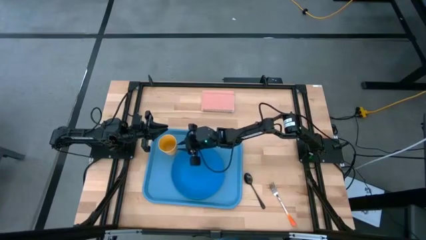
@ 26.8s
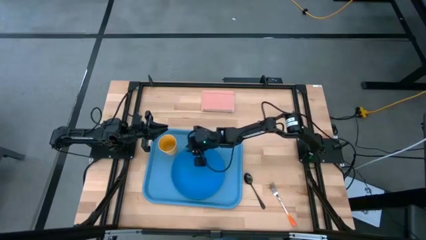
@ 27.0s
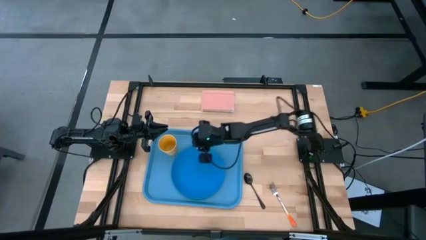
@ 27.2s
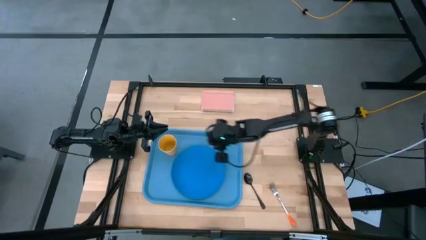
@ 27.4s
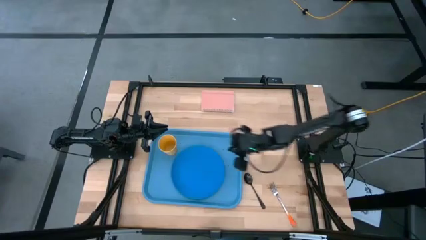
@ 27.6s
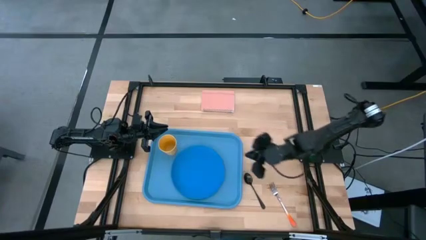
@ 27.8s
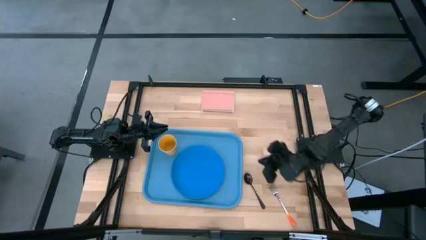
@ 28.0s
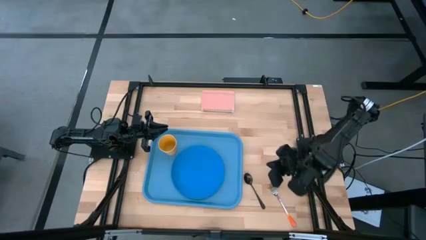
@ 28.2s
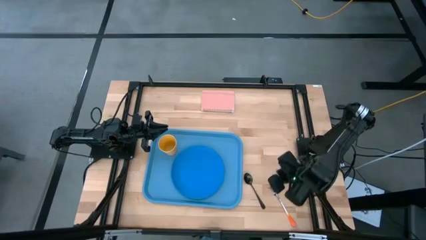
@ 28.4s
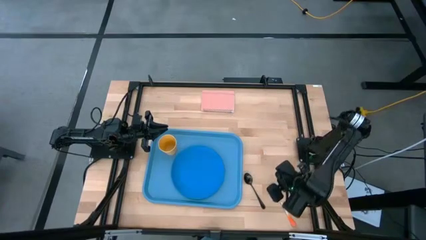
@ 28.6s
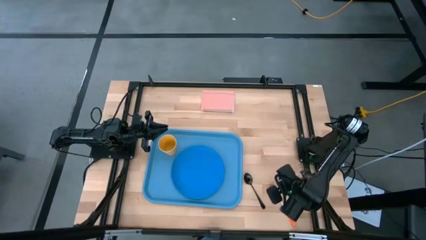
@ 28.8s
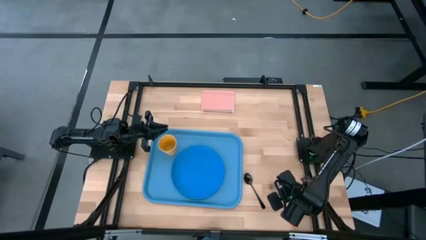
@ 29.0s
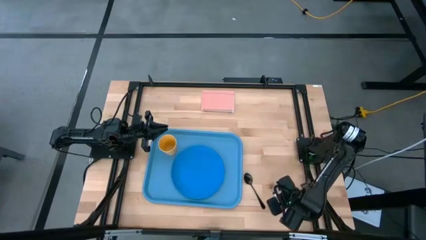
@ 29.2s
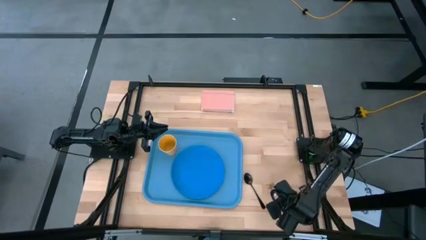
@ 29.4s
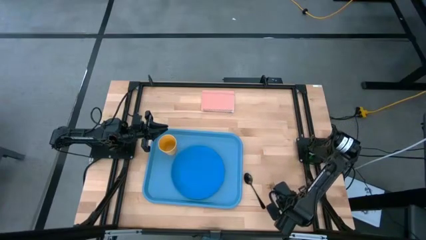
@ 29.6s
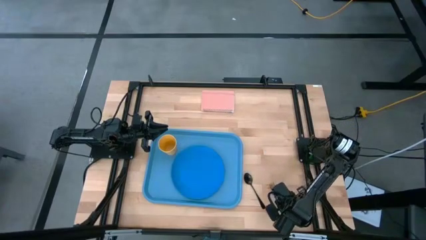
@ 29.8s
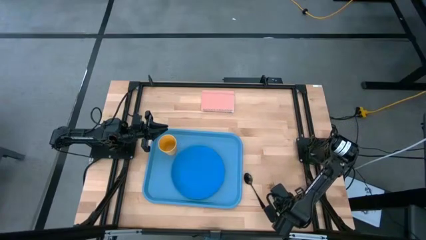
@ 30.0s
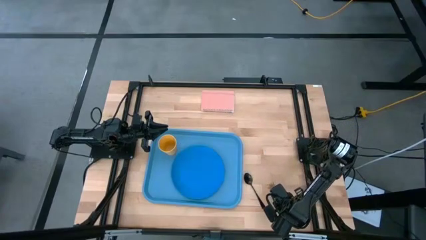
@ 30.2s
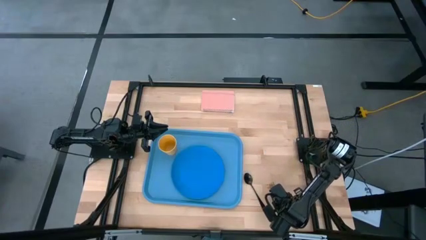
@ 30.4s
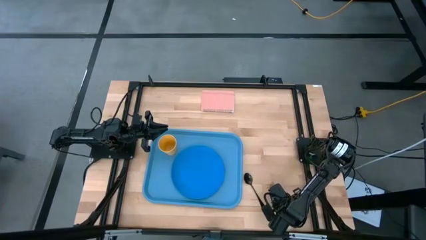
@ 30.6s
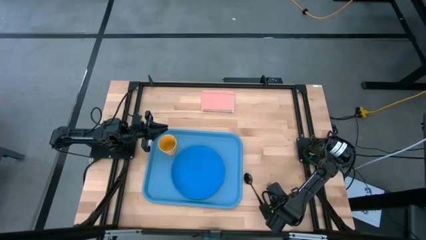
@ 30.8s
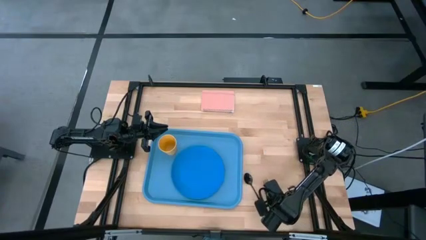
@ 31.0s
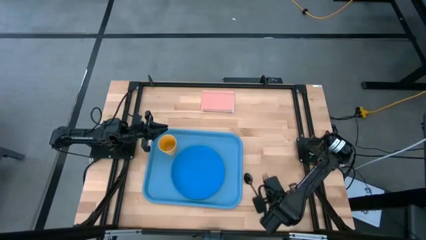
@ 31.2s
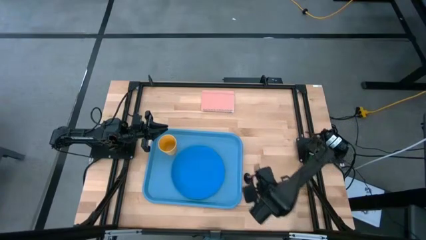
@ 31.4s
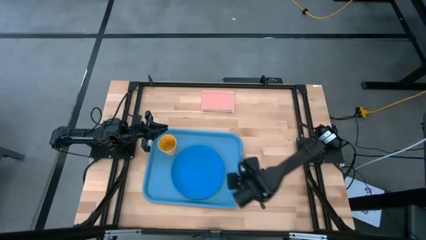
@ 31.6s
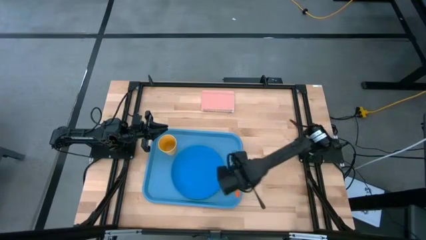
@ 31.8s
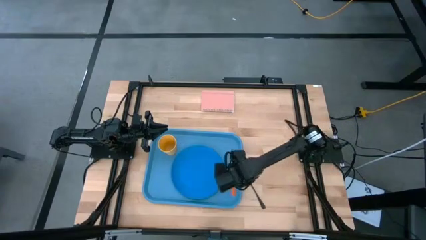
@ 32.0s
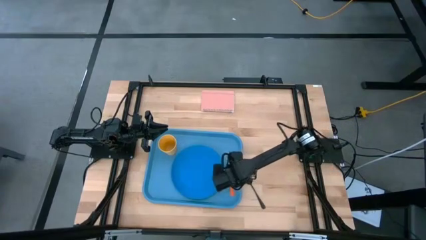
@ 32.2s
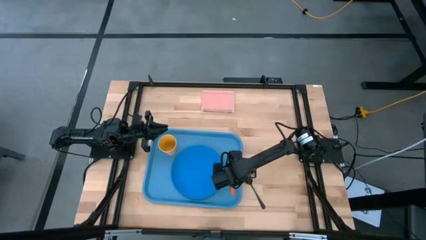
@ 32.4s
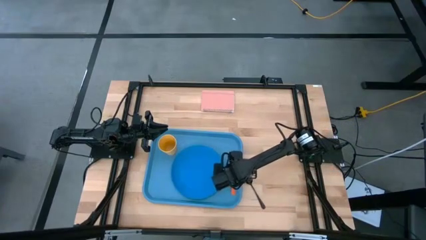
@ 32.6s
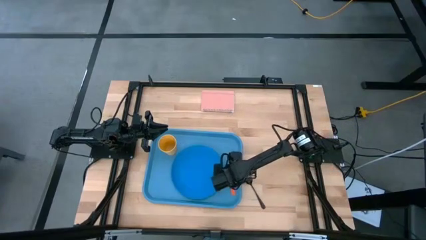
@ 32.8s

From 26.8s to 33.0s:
Task: Pick and place plate/cup/fork/spoon on tray
Put the orange fork on the blue tray to the right of the blue plate

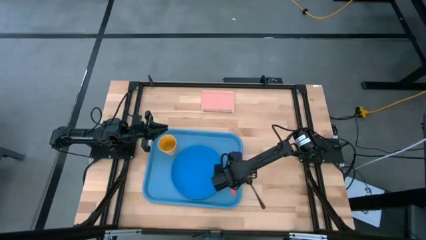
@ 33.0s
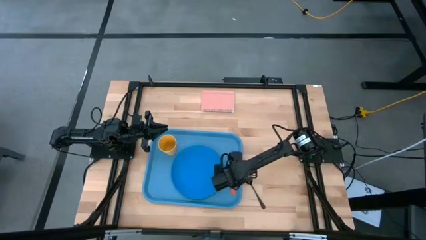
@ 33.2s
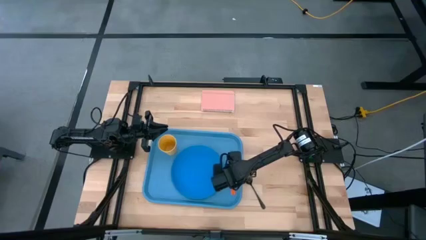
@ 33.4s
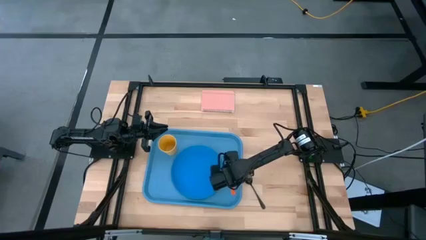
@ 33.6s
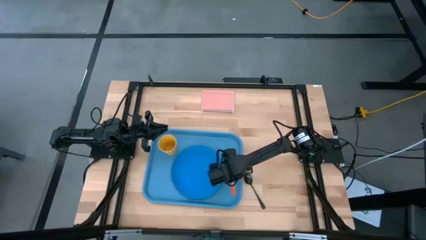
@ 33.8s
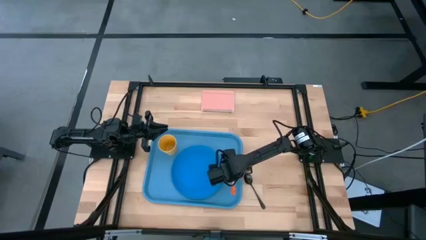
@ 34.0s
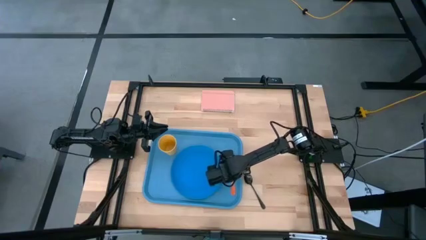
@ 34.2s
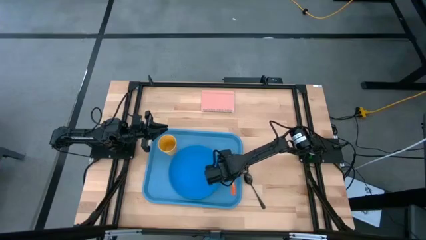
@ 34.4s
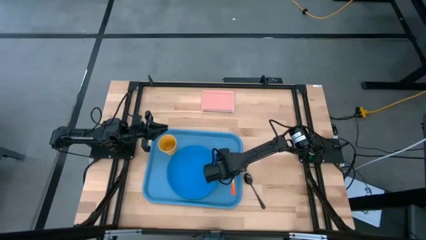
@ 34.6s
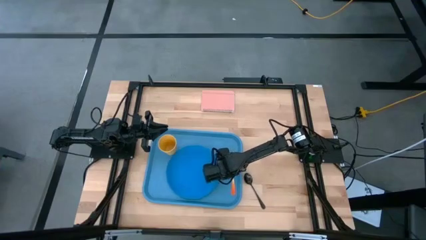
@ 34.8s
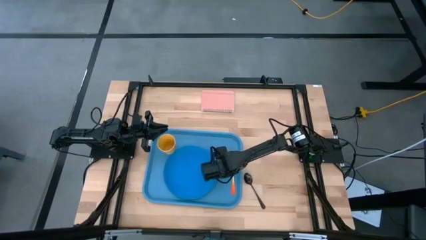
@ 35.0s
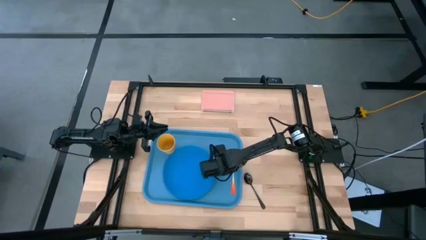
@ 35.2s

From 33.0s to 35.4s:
Adjust the blue plate

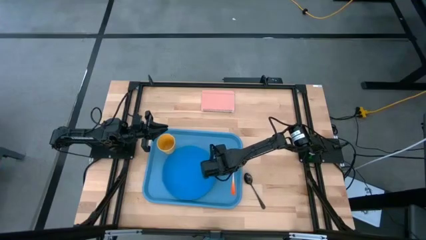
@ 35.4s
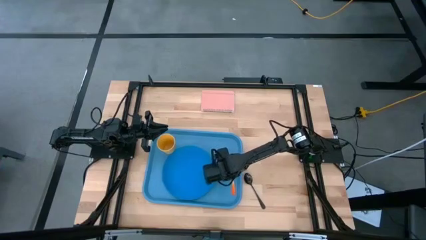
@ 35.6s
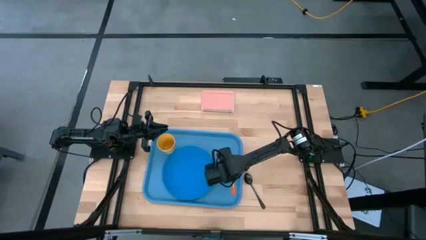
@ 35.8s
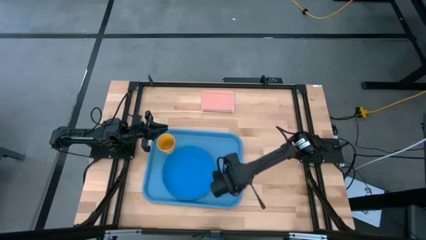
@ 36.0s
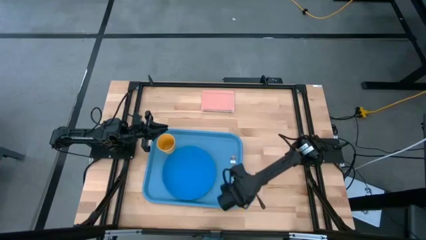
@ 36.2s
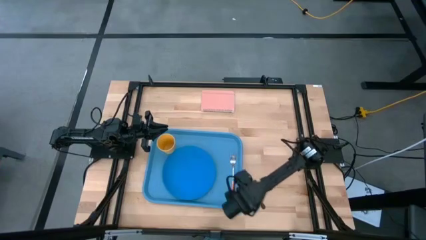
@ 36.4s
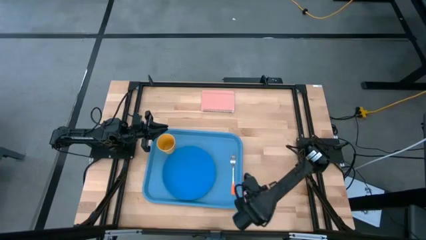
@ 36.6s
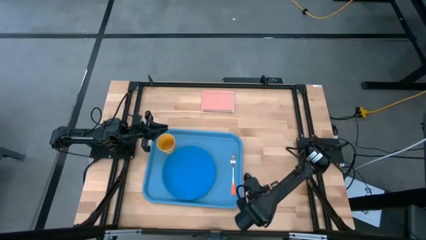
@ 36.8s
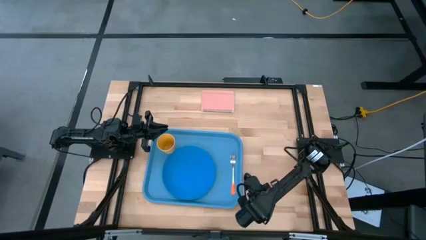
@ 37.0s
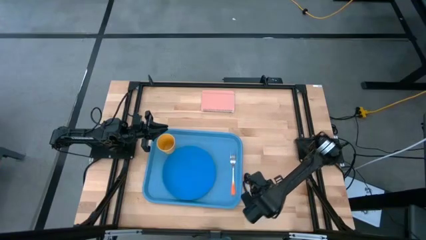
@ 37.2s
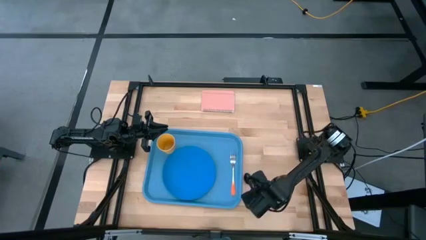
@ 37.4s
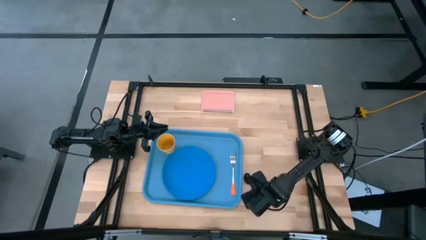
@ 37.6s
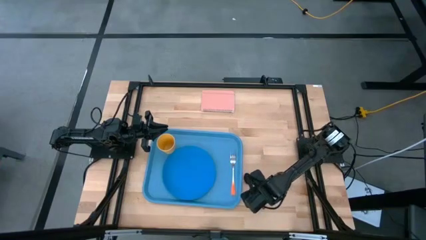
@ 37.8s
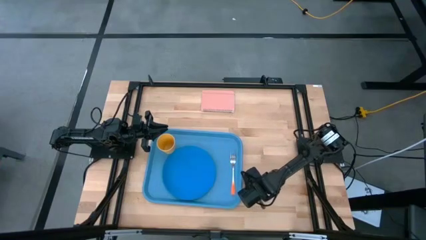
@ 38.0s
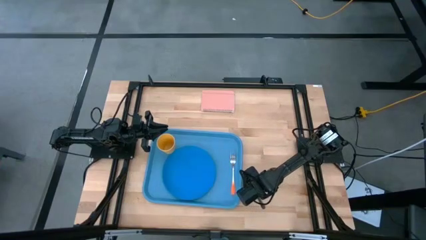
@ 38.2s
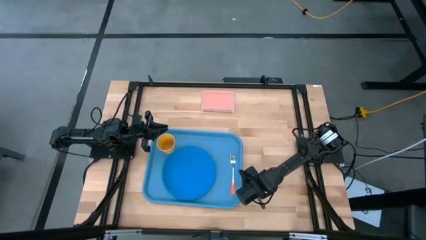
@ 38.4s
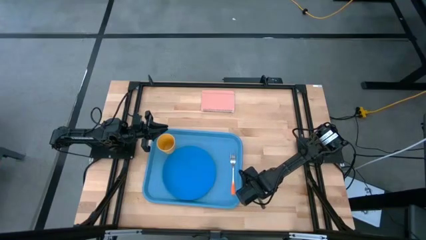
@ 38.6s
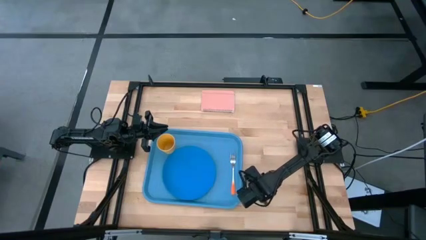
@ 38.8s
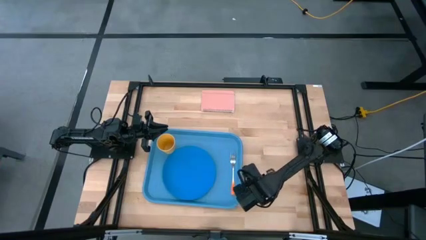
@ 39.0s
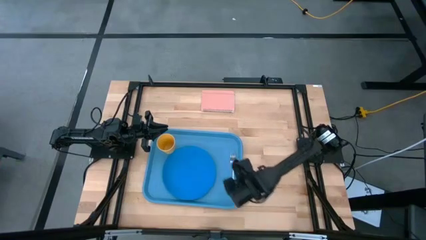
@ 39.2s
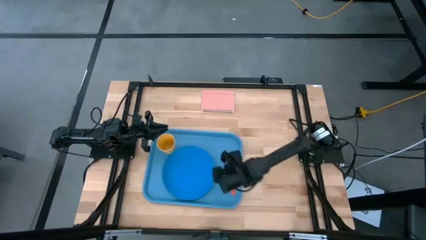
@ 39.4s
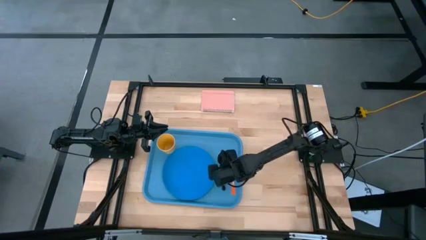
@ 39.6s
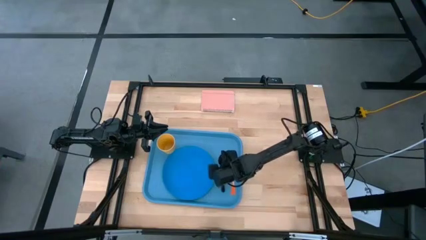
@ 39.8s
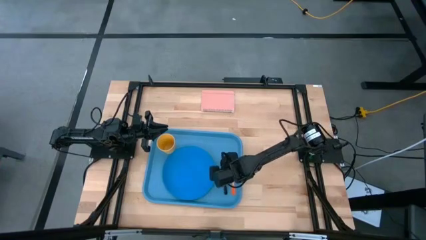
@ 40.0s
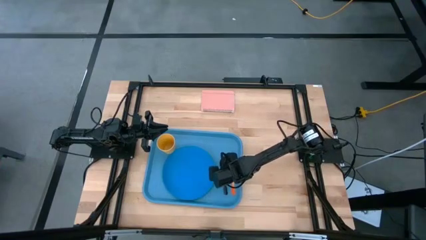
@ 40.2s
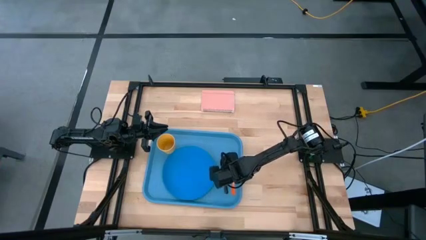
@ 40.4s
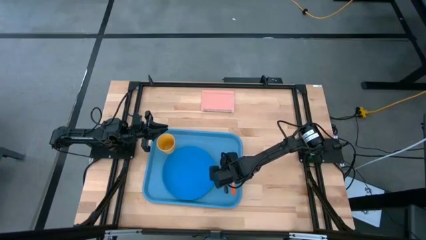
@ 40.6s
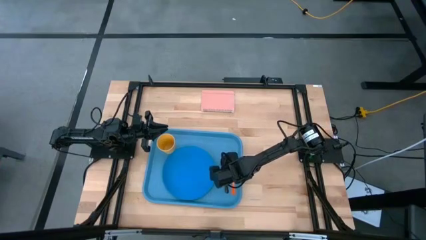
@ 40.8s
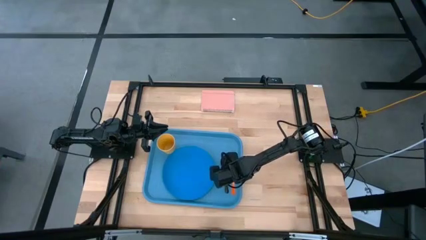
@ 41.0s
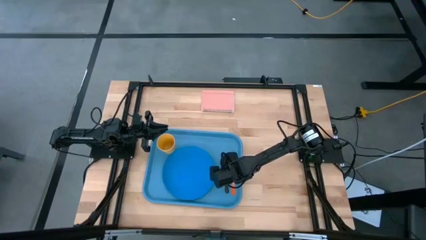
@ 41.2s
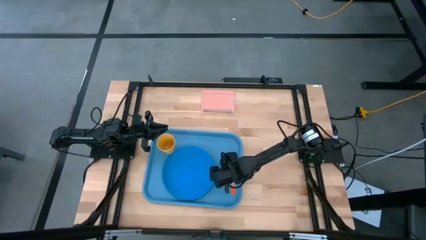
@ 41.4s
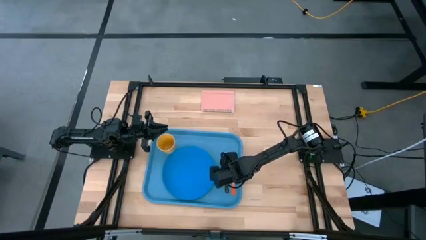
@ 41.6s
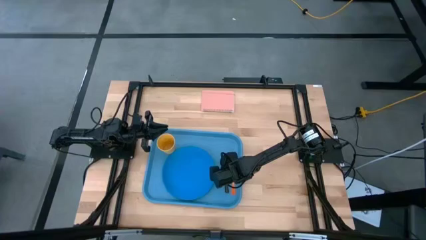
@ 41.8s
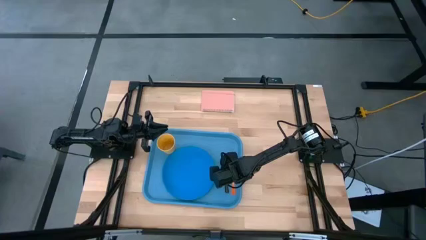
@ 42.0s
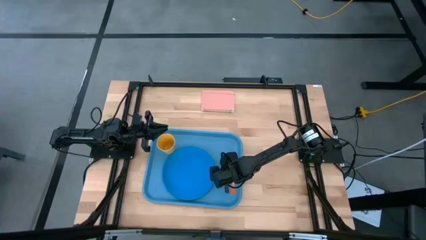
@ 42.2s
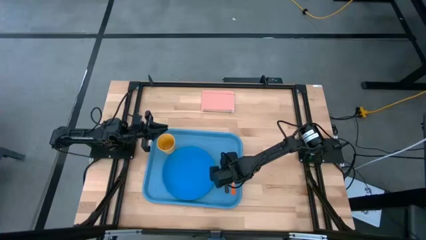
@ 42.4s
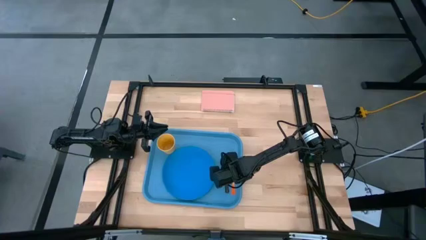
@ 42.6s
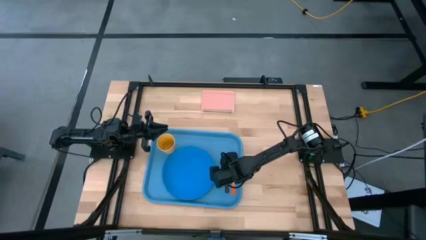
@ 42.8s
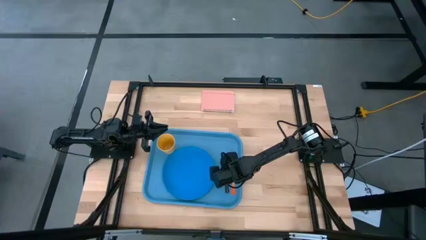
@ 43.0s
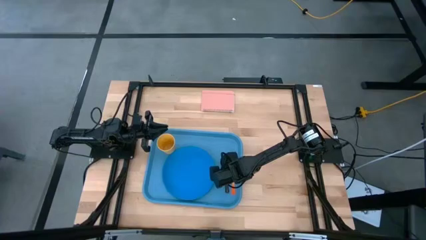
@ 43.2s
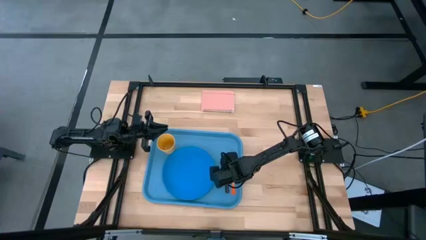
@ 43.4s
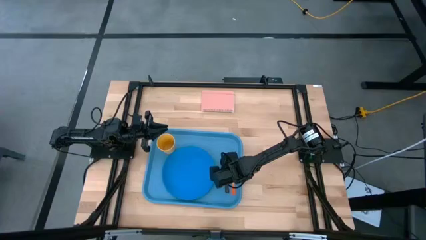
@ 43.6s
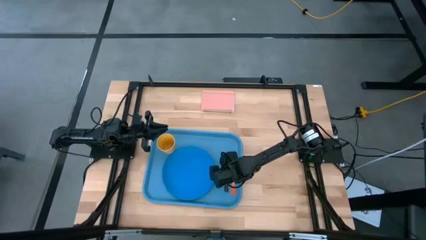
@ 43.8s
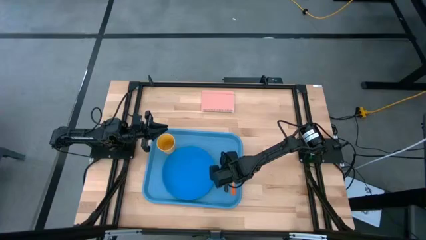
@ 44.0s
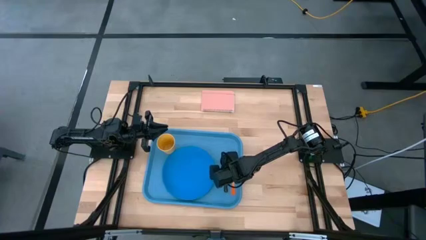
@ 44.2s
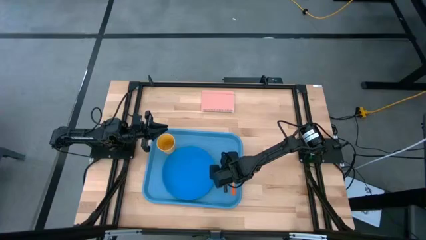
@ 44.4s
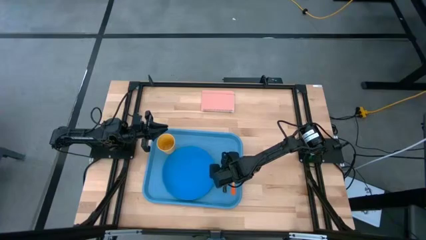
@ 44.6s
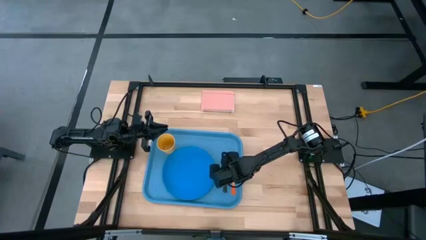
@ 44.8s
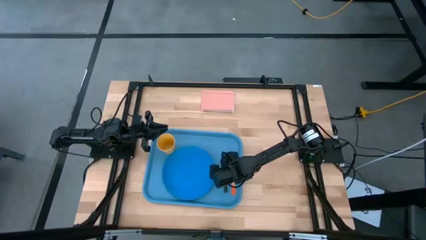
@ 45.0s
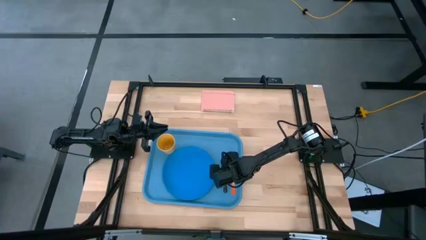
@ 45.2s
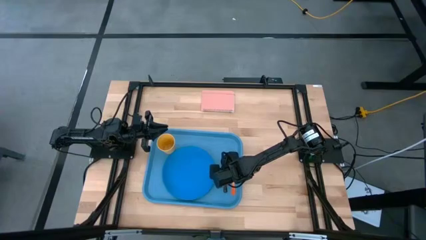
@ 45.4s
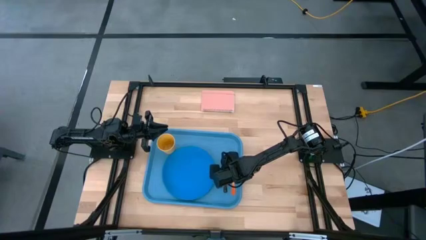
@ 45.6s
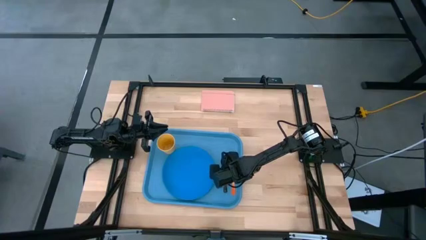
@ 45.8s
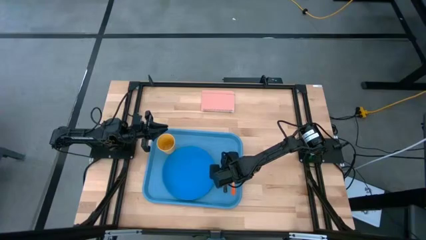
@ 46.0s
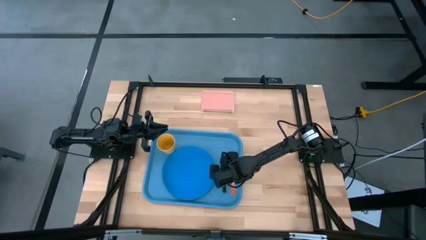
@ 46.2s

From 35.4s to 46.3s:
Put the spoon on the blue tray to the right of the blue plate
